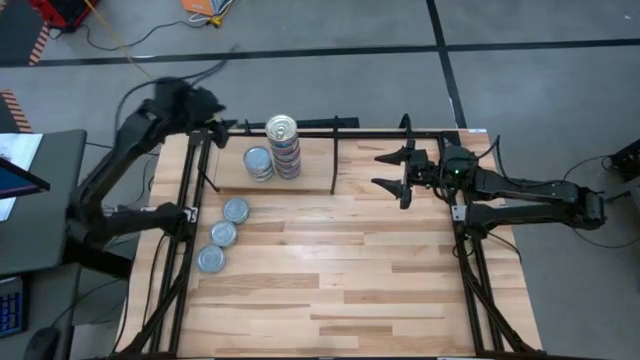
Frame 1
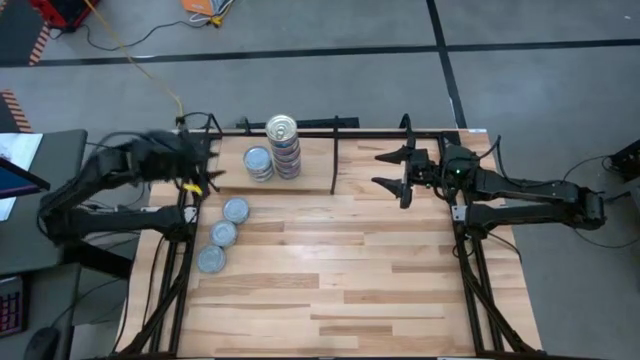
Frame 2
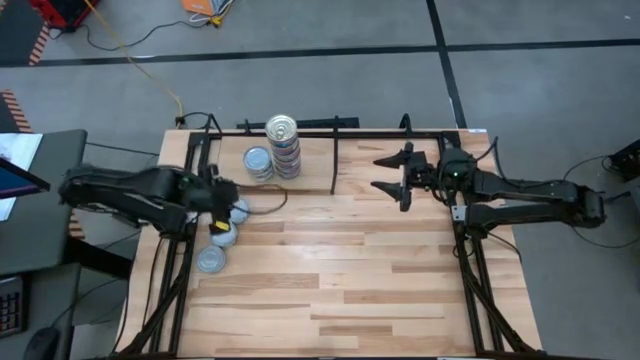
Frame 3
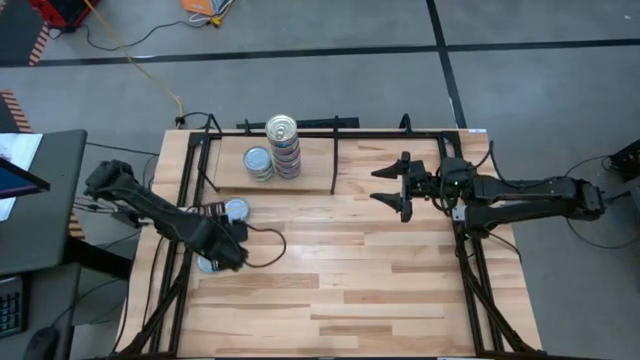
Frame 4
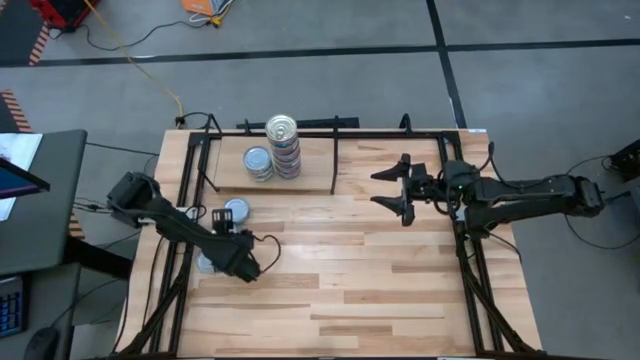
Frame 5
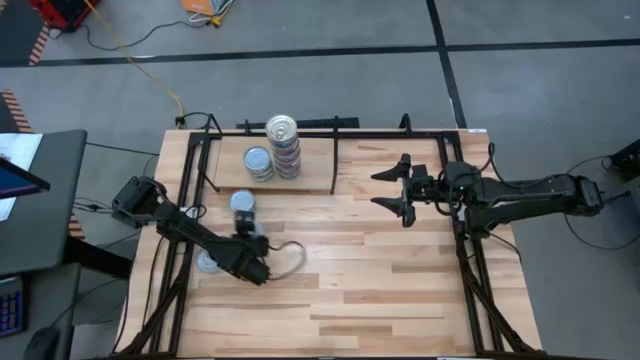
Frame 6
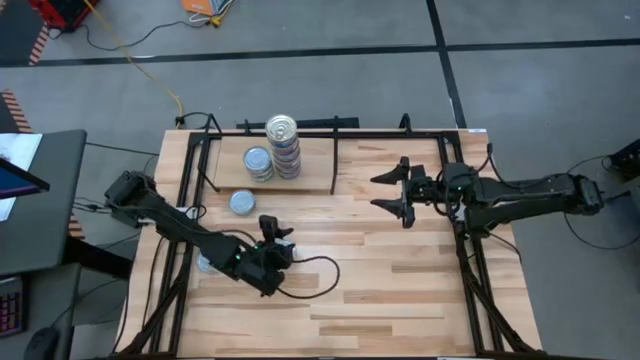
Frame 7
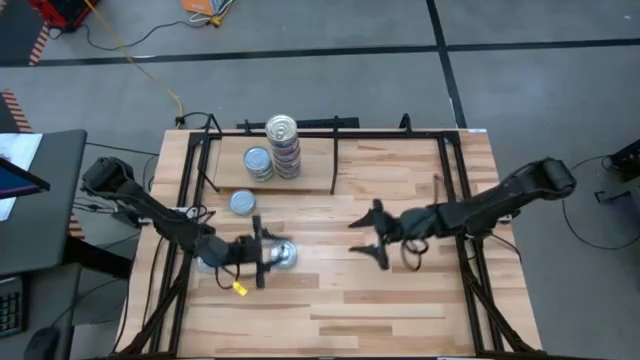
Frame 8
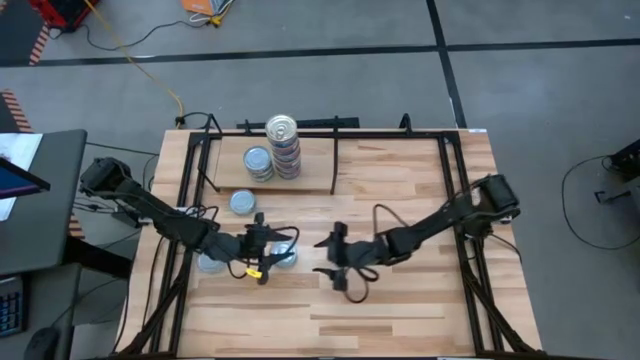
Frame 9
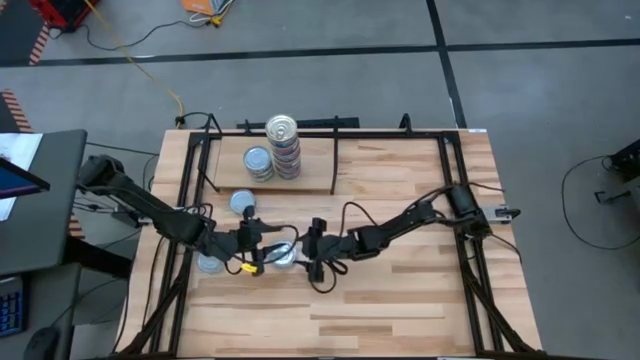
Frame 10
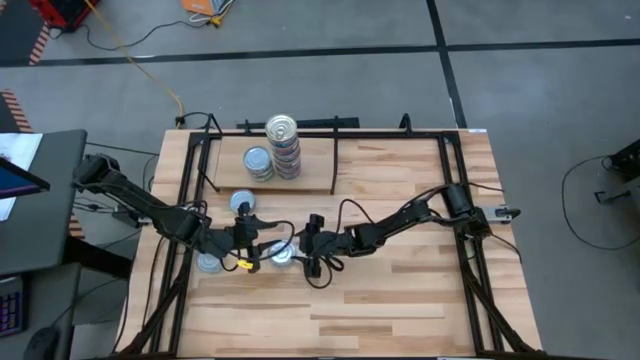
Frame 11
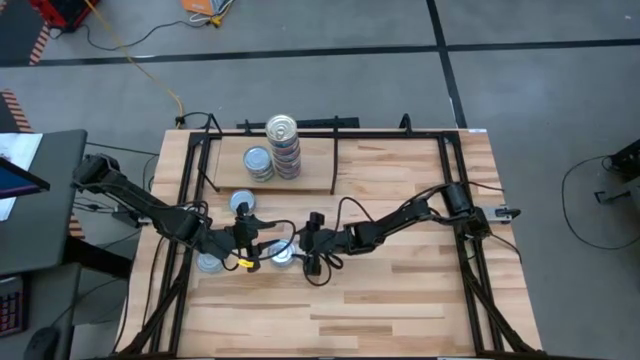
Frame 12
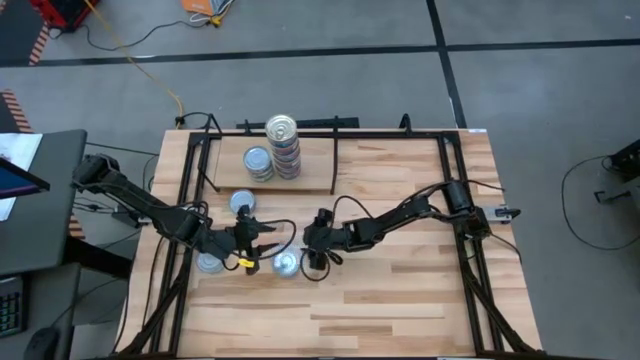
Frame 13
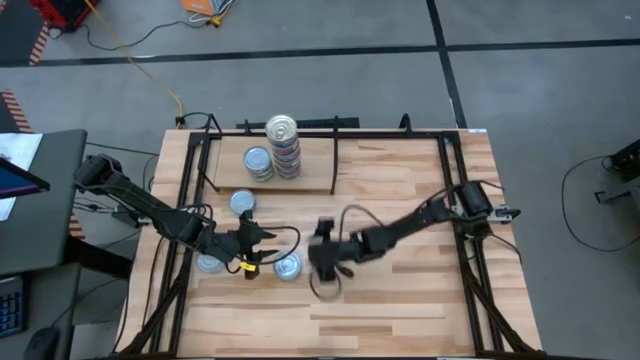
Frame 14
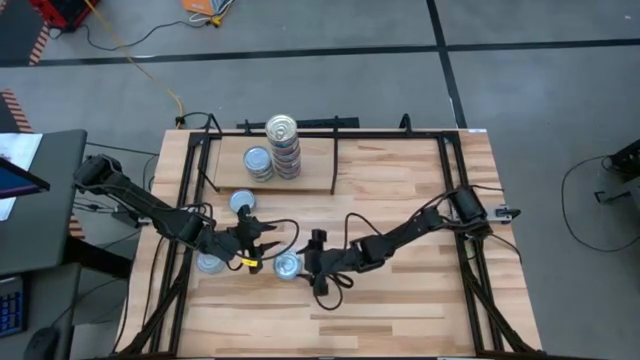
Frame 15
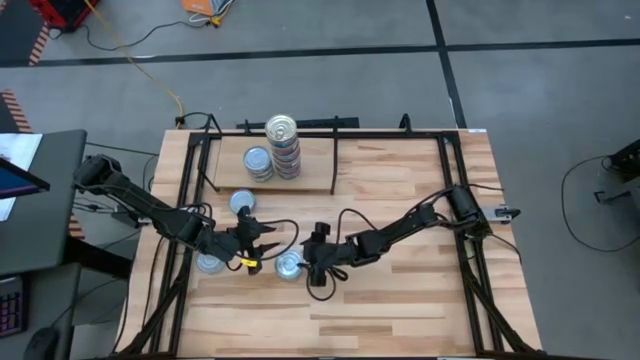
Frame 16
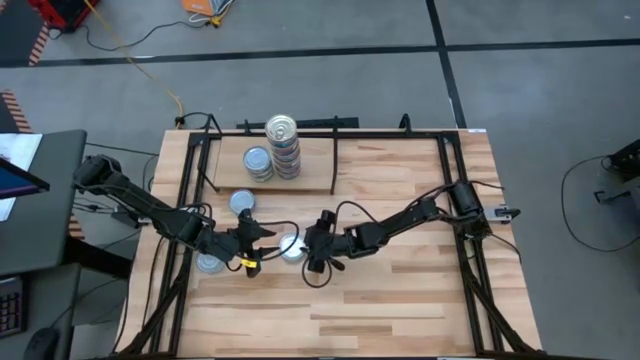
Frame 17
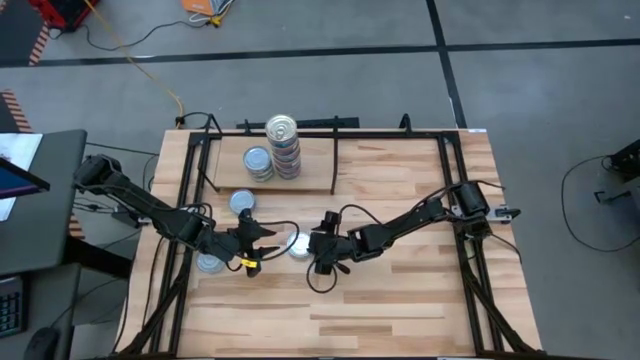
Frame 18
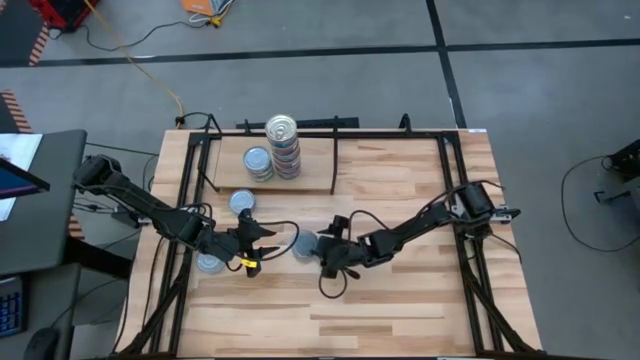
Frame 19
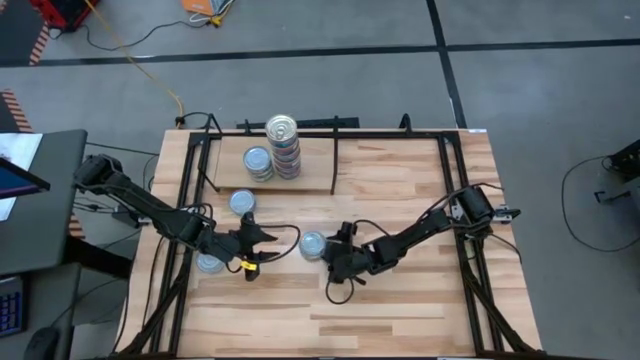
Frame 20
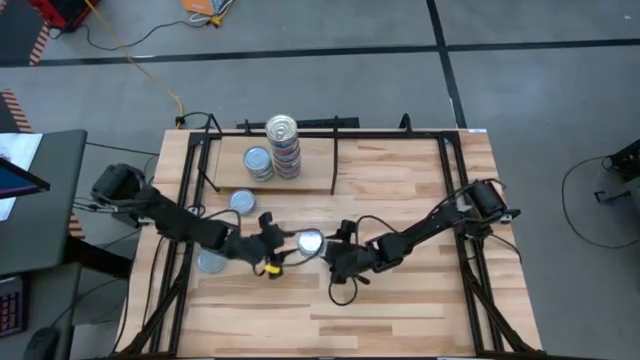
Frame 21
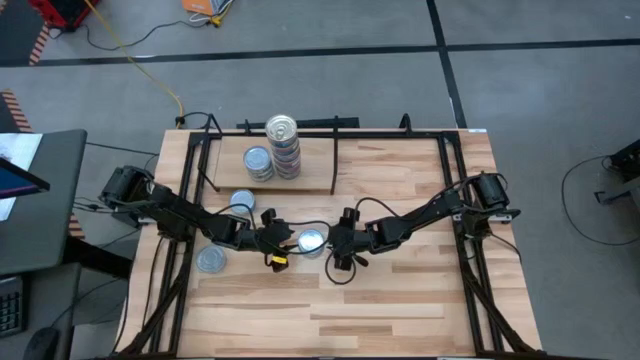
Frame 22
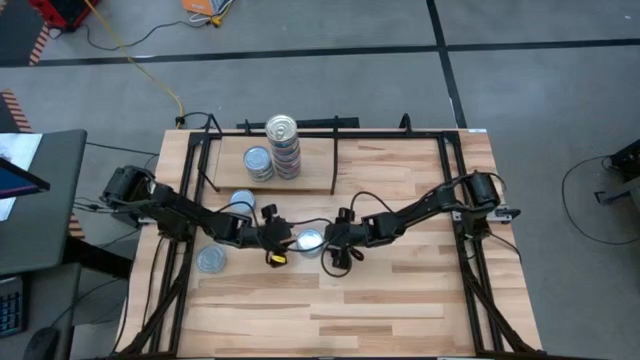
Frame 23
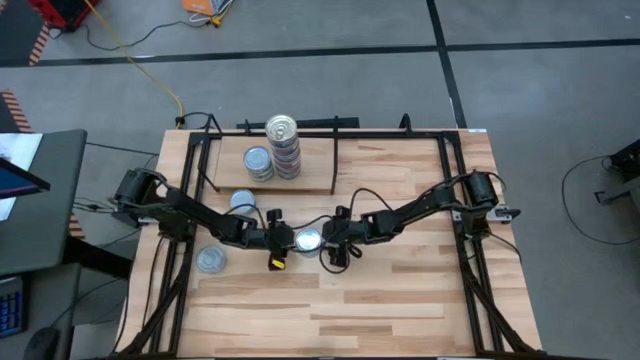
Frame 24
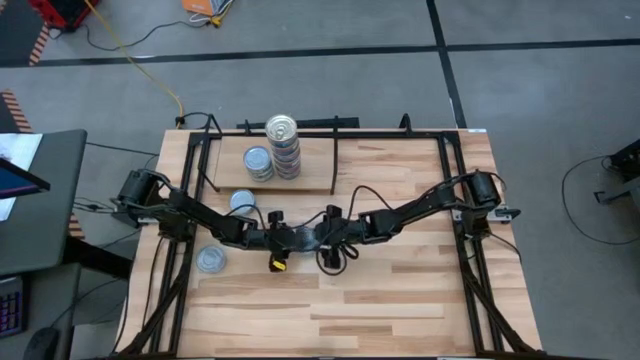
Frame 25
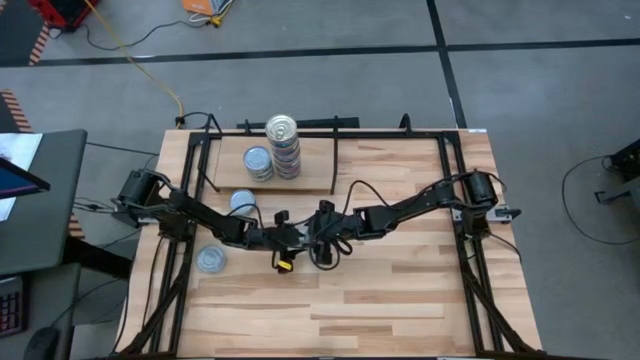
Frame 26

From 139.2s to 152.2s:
Task: Stack canned seafood by type on shelf
Stack the green tuna can on top of the green tuna cans on the shelf

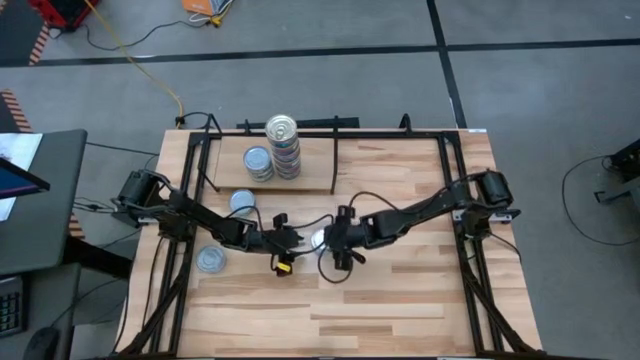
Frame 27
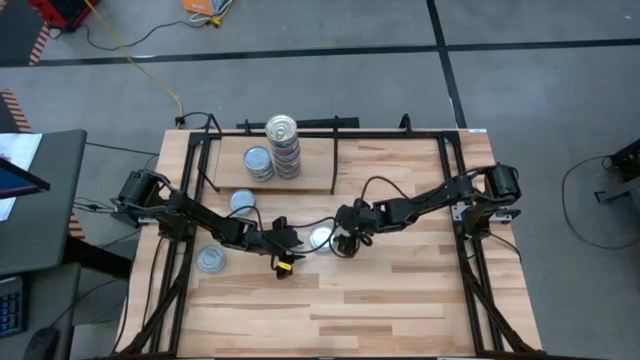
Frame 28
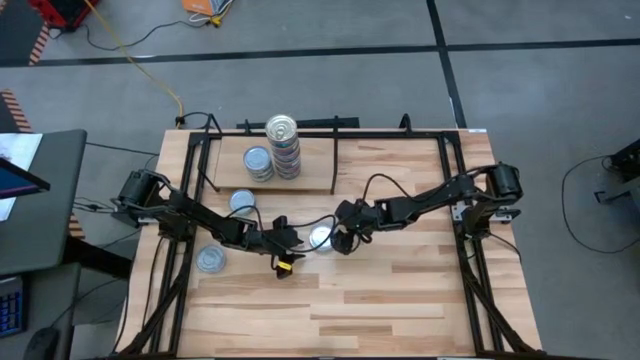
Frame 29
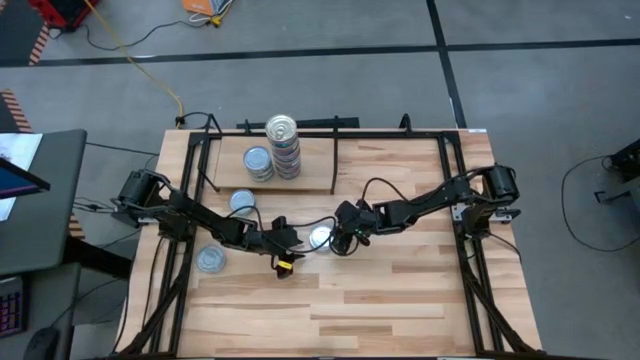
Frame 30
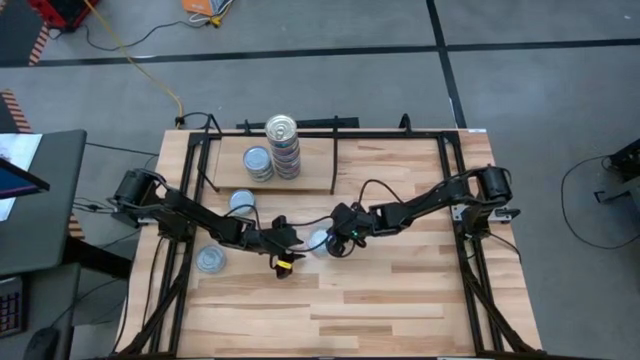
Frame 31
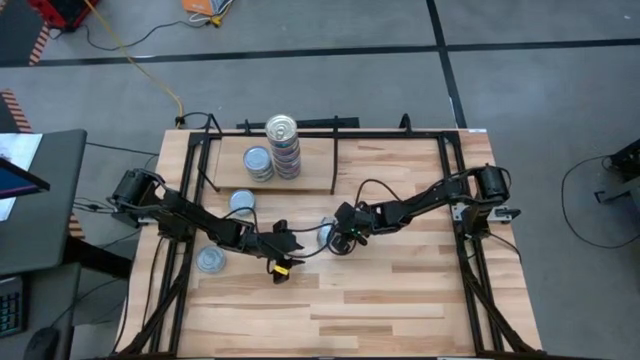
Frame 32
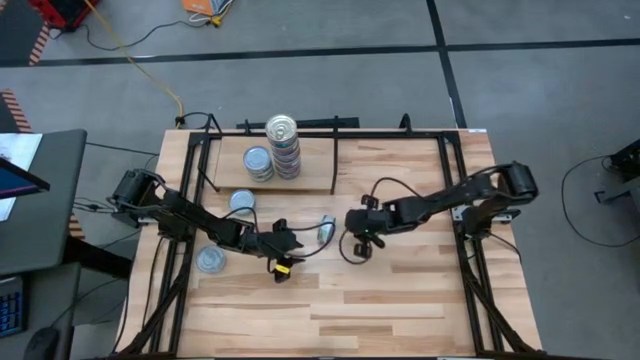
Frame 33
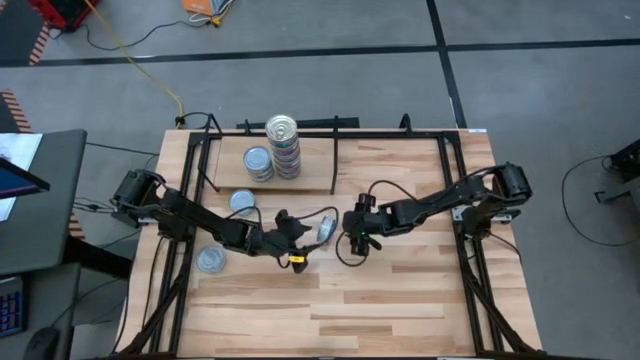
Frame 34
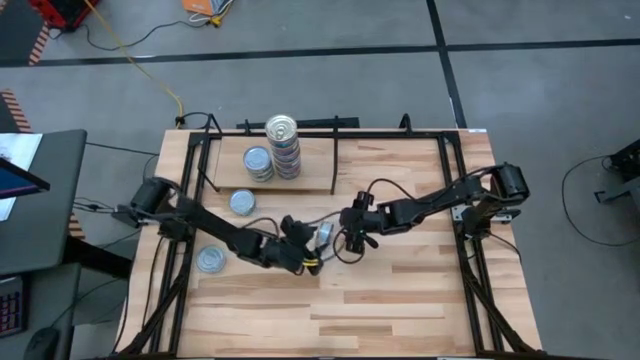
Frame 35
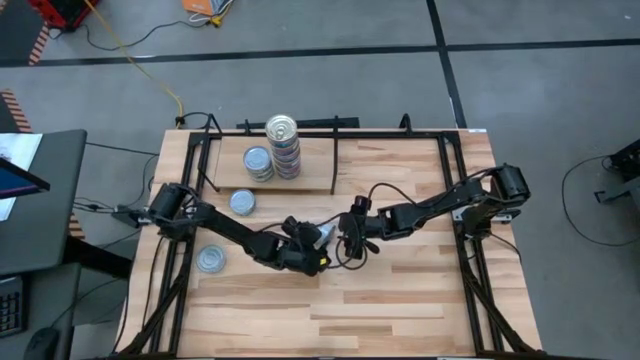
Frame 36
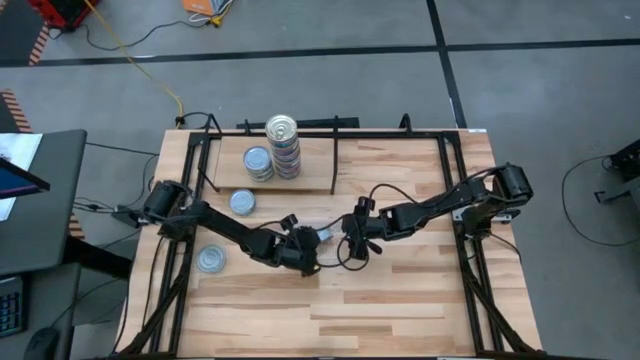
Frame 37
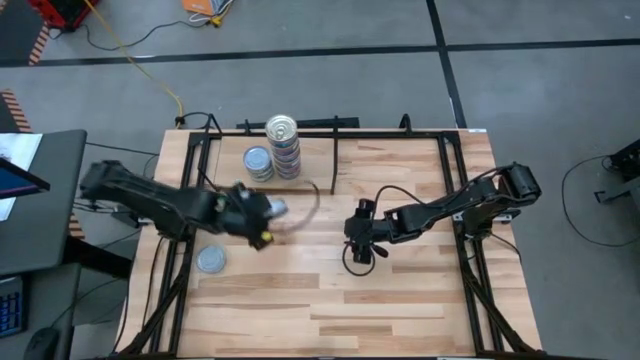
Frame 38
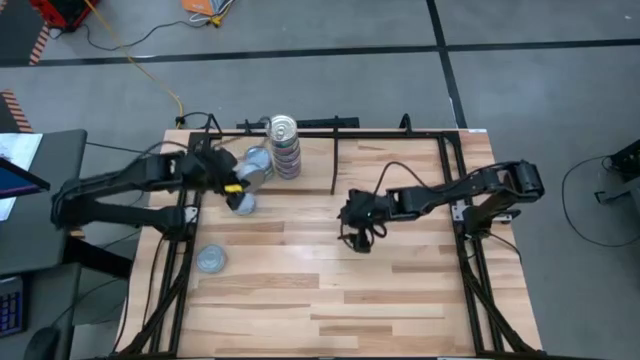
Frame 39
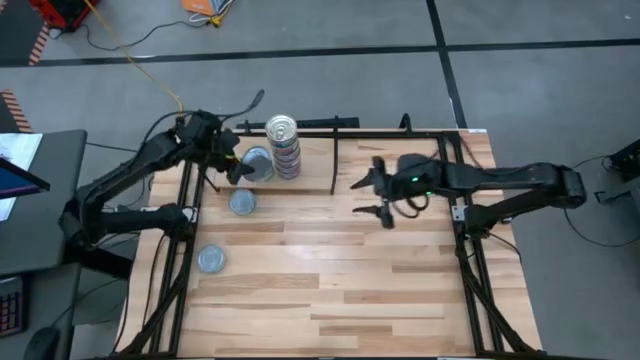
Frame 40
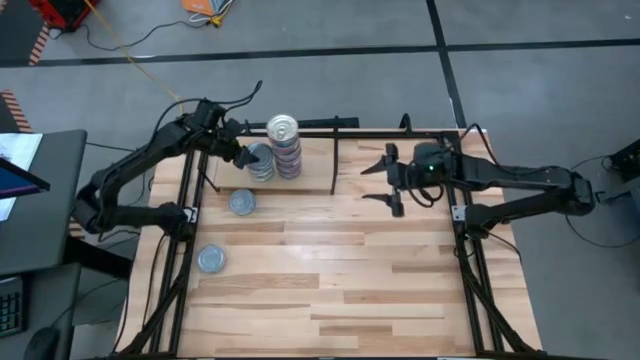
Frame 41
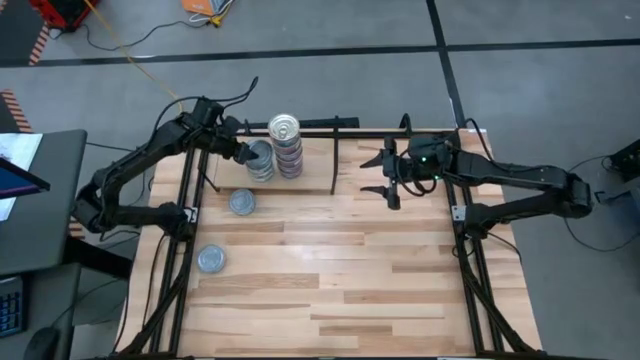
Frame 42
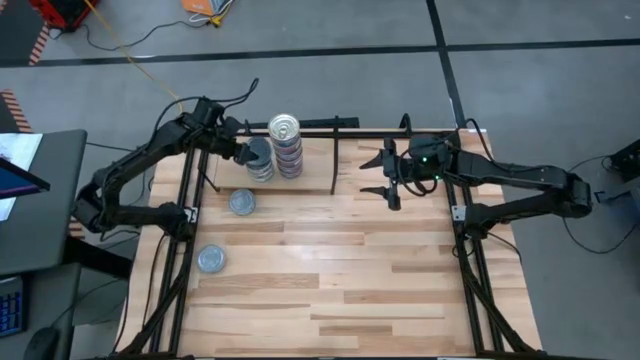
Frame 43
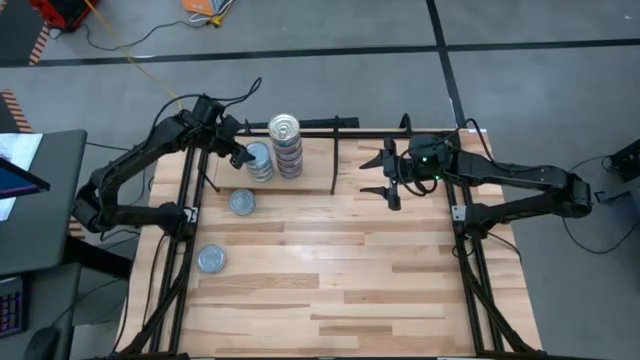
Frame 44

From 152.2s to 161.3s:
Stack the green tuna can on top of the green tuna cans on the shelf
